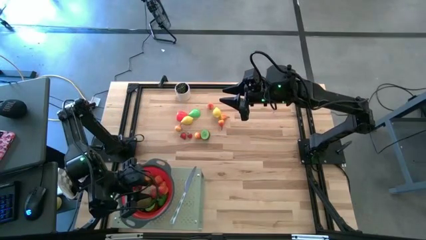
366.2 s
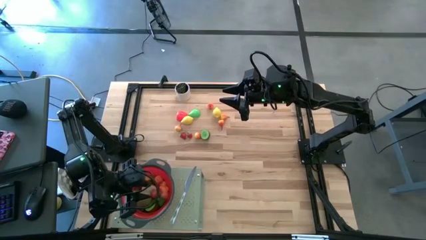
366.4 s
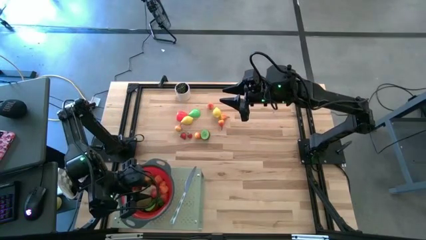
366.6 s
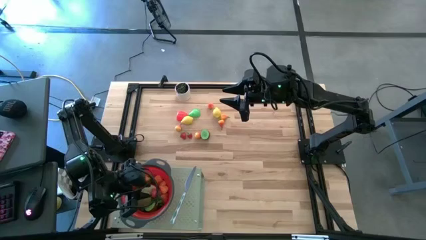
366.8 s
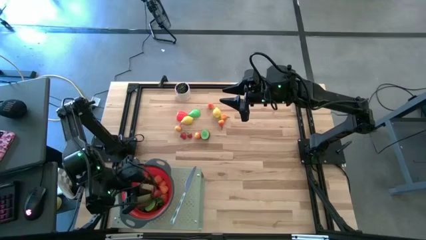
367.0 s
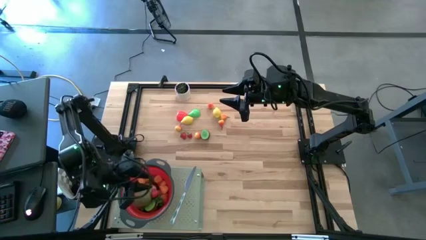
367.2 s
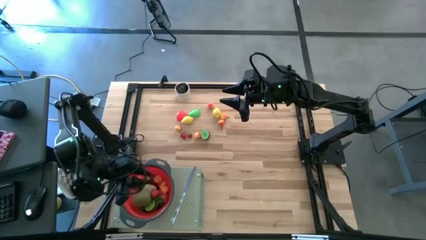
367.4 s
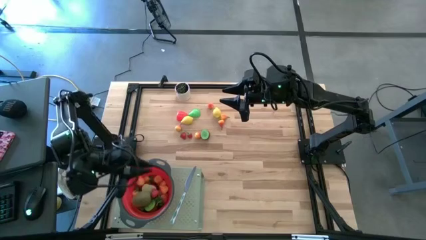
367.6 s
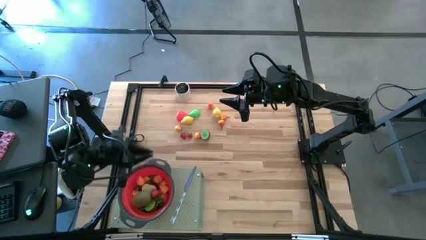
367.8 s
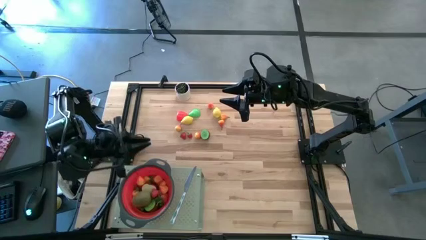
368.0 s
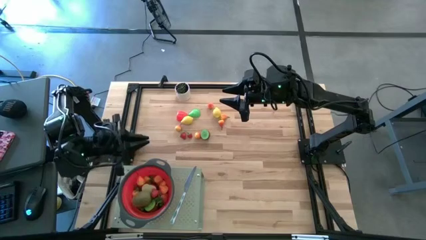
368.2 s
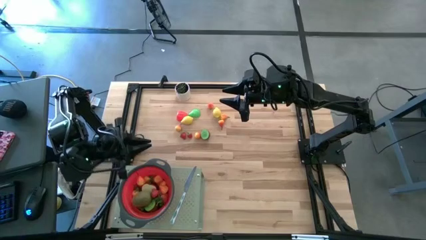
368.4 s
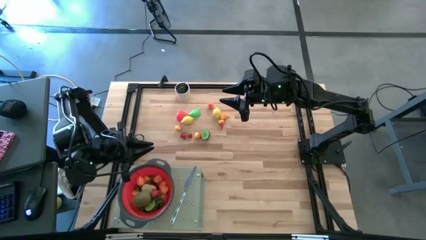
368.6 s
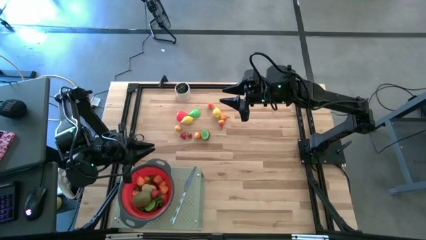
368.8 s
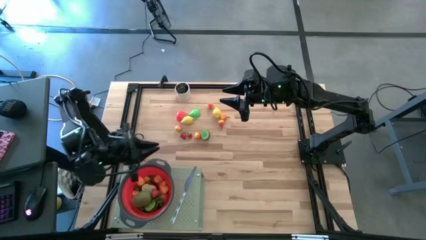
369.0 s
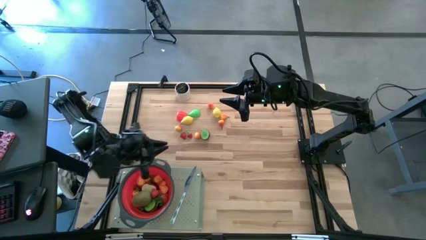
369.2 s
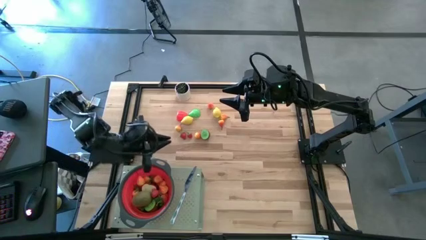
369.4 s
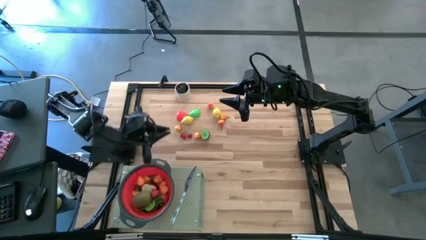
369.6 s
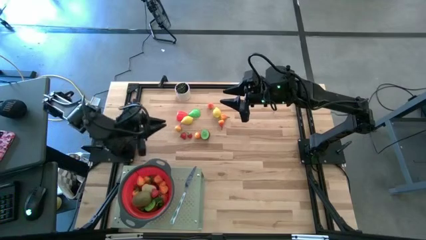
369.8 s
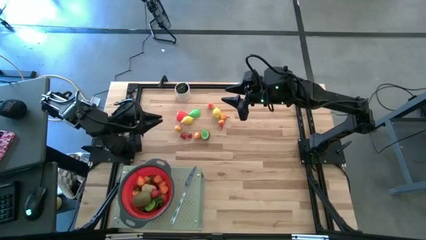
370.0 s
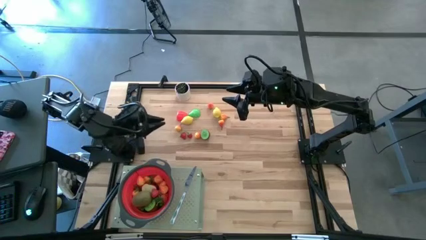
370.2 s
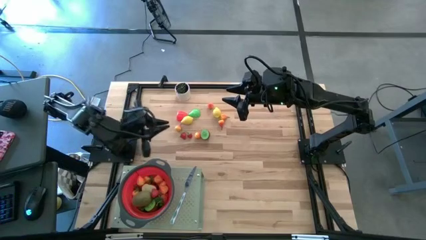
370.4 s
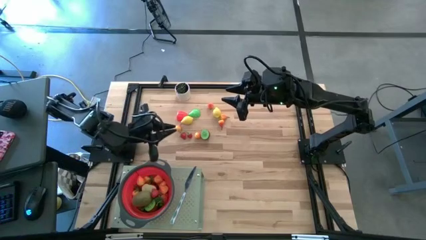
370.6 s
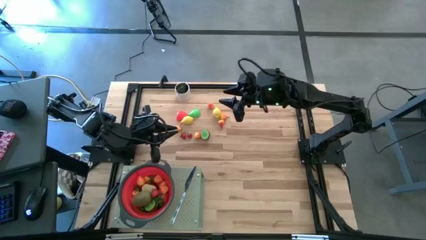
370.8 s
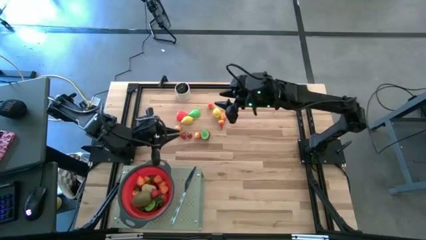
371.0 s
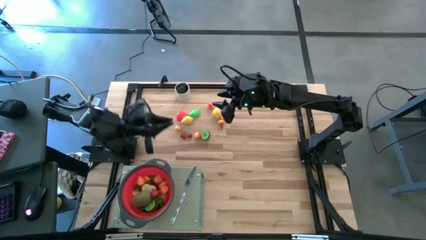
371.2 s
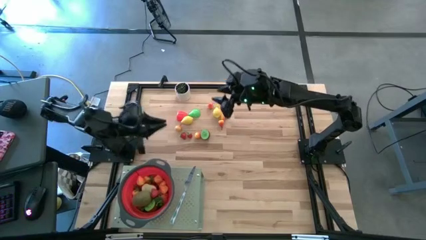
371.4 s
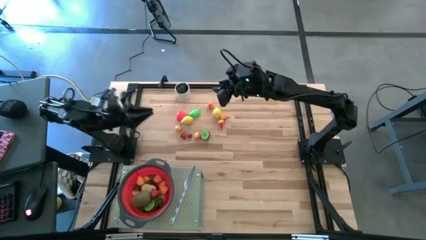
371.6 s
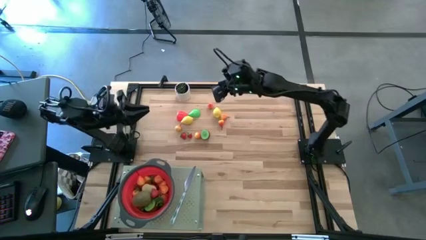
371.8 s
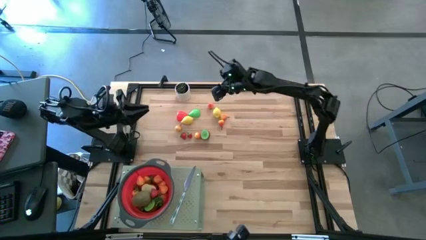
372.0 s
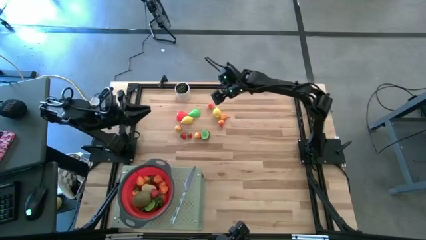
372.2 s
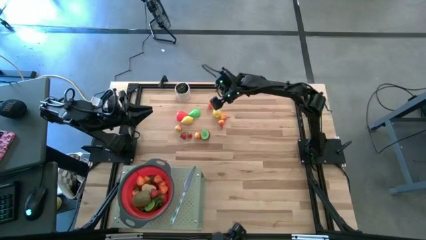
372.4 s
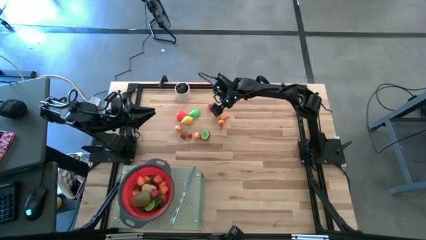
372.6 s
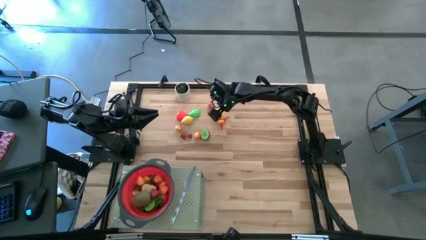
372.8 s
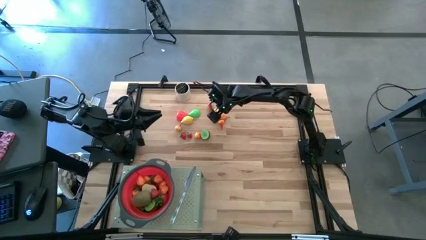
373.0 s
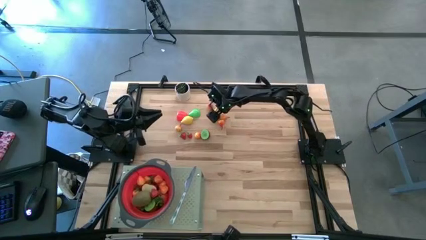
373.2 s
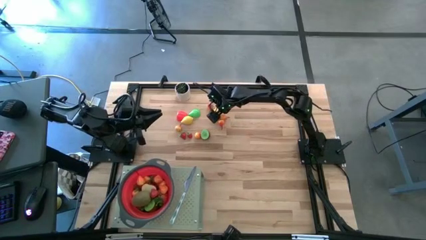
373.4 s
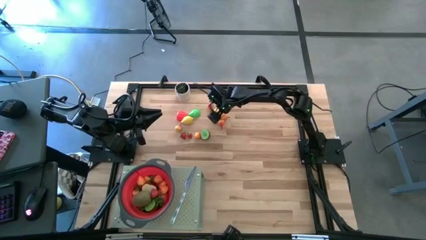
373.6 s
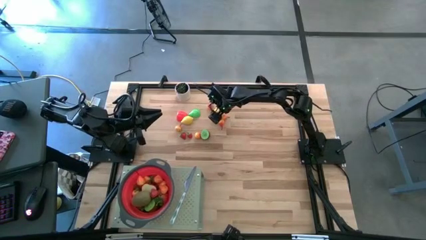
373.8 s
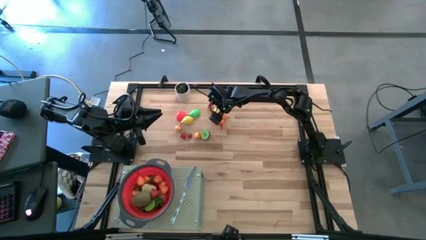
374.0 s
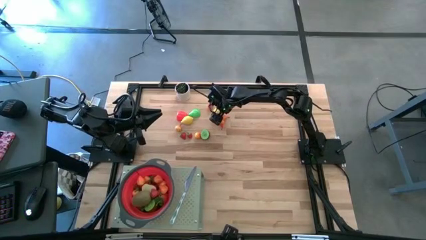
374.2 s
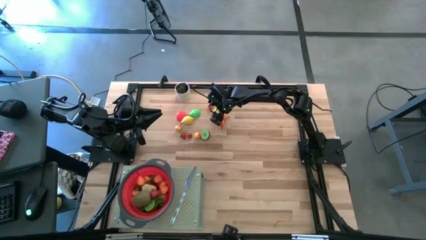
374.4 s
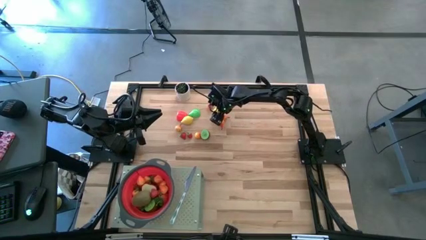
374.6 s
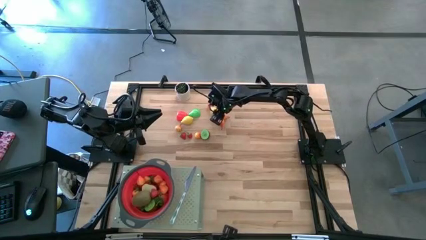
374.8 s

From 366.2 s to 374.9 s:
Task: Pick & Place Fruit
Put the lemon into the red strainer bowl on the shelf

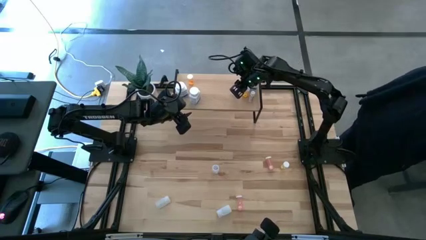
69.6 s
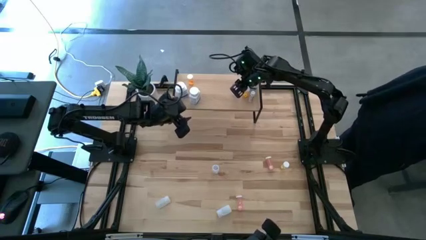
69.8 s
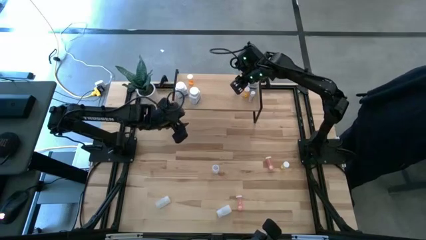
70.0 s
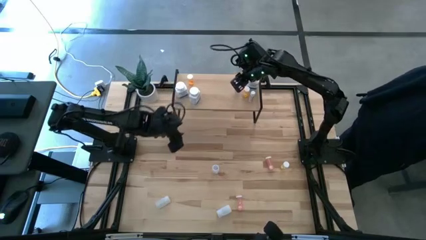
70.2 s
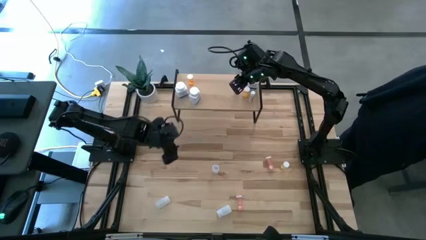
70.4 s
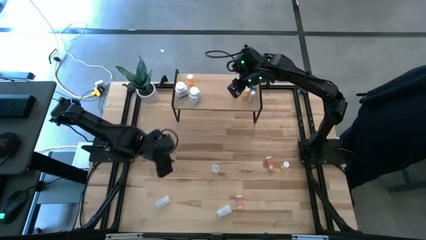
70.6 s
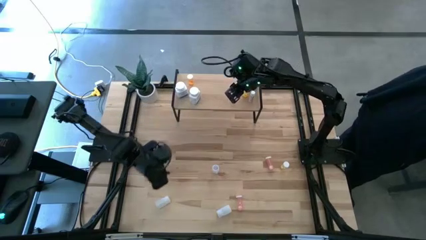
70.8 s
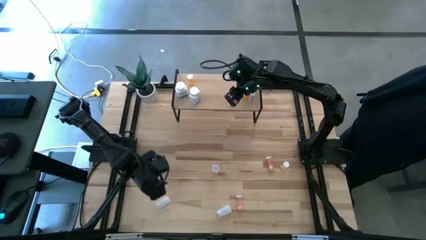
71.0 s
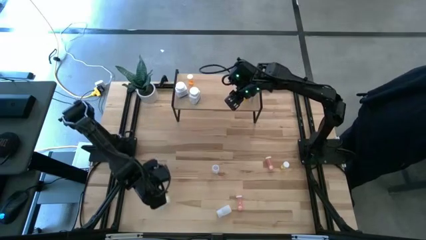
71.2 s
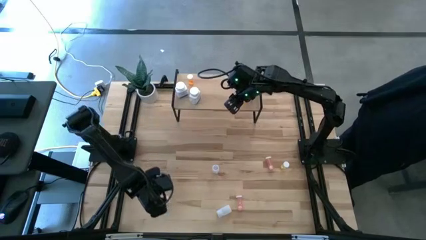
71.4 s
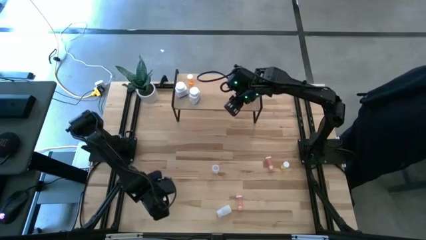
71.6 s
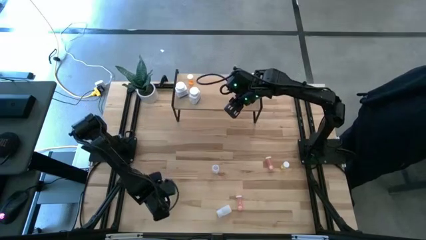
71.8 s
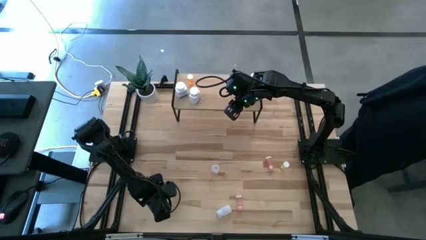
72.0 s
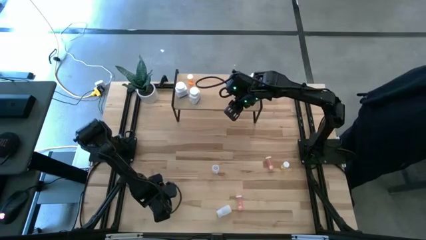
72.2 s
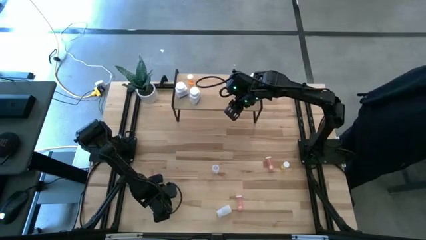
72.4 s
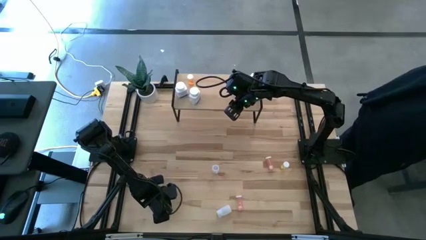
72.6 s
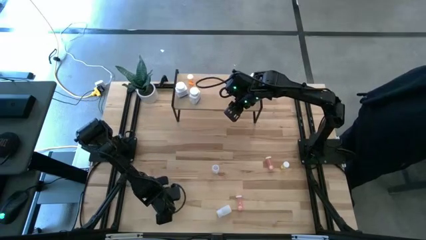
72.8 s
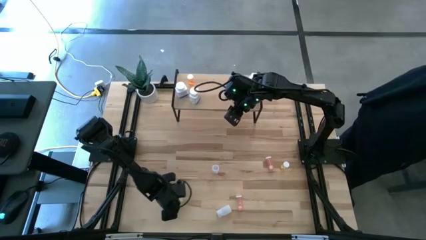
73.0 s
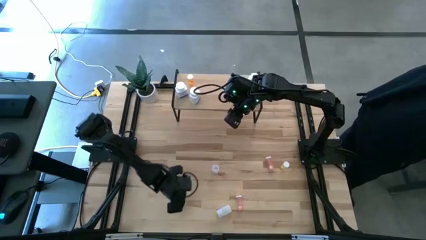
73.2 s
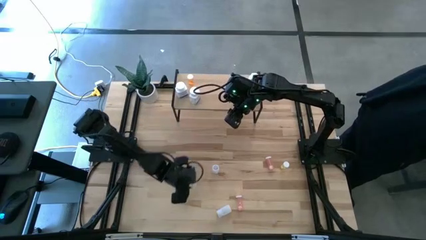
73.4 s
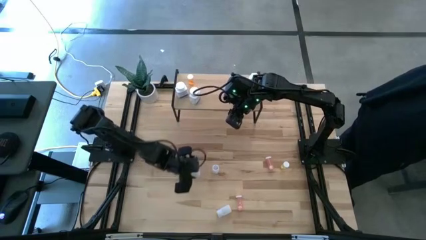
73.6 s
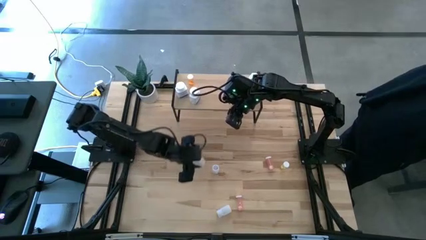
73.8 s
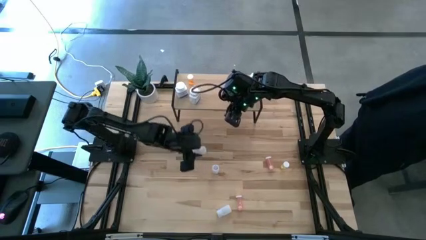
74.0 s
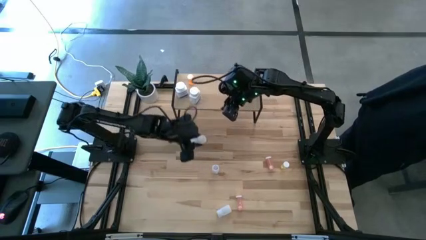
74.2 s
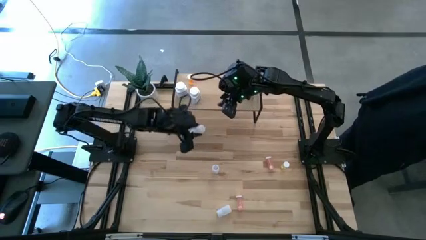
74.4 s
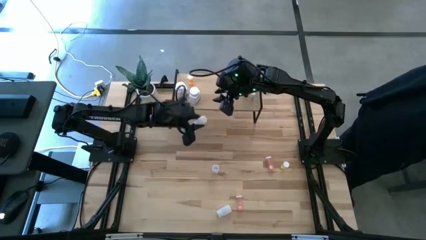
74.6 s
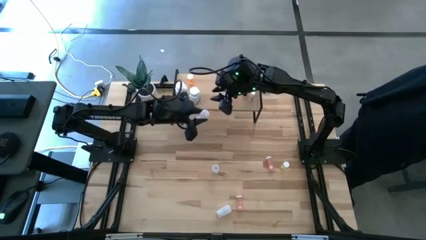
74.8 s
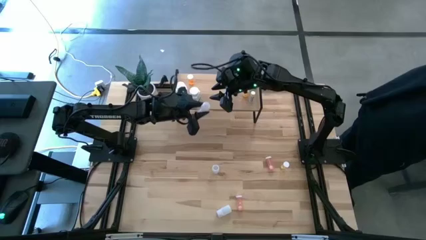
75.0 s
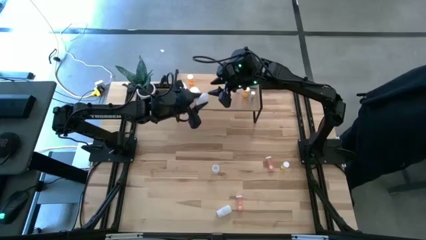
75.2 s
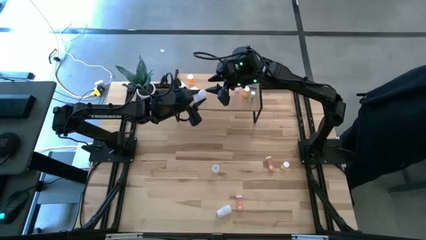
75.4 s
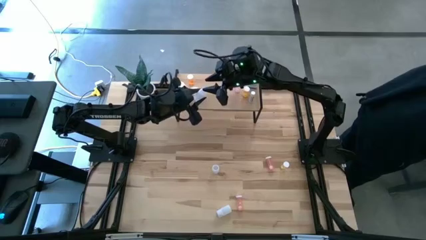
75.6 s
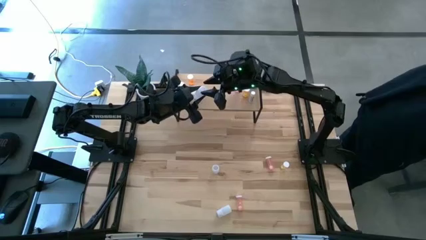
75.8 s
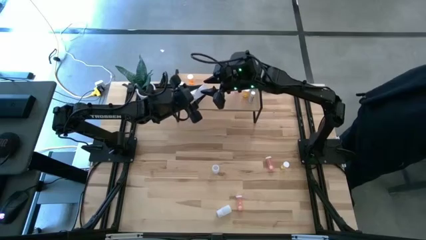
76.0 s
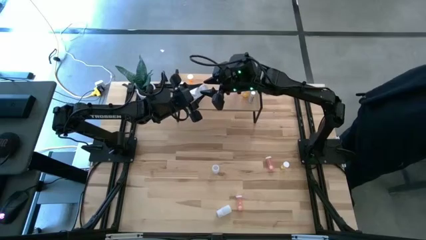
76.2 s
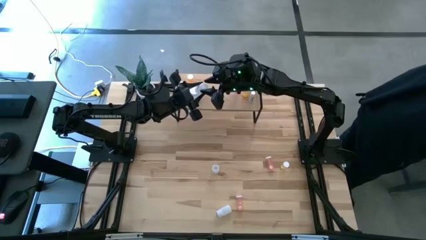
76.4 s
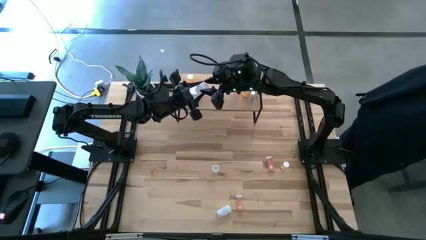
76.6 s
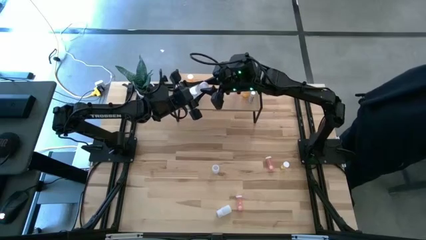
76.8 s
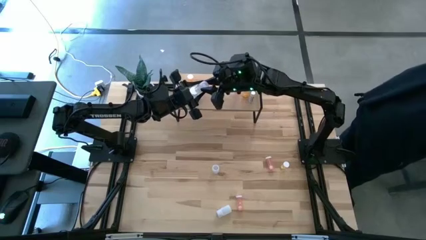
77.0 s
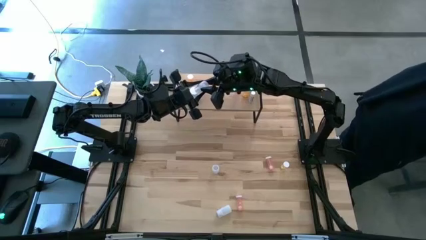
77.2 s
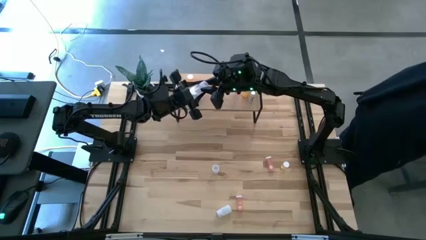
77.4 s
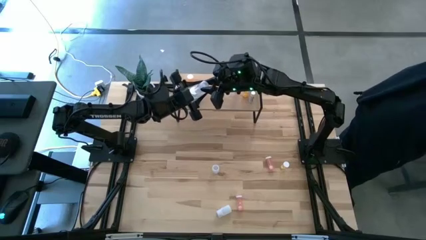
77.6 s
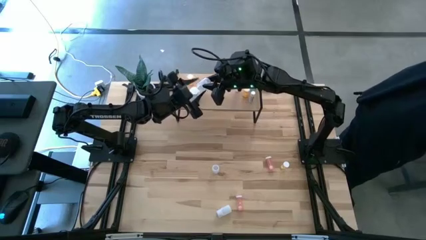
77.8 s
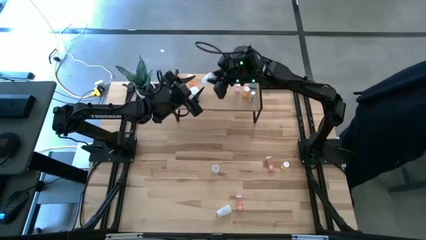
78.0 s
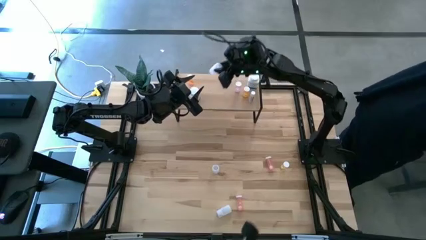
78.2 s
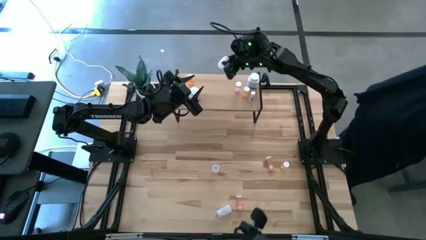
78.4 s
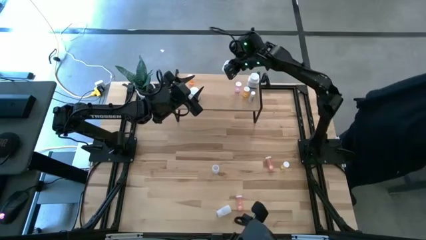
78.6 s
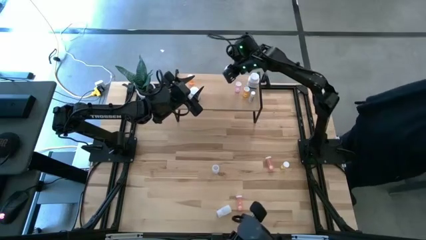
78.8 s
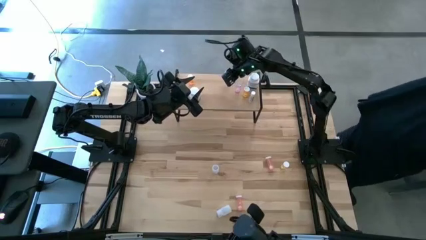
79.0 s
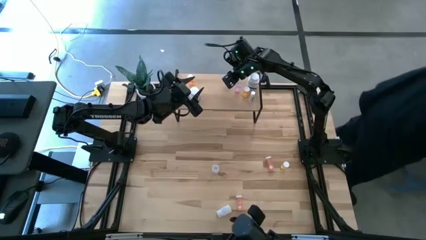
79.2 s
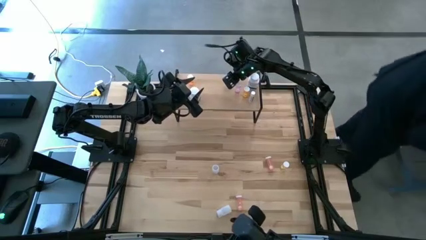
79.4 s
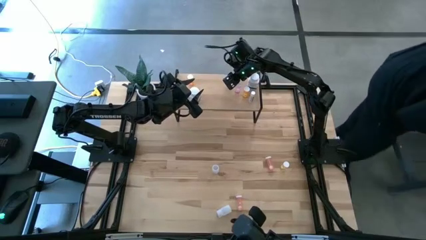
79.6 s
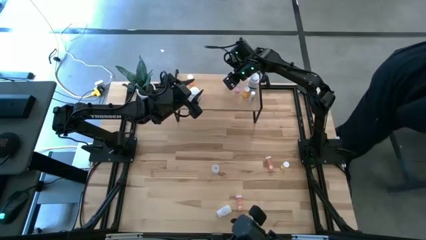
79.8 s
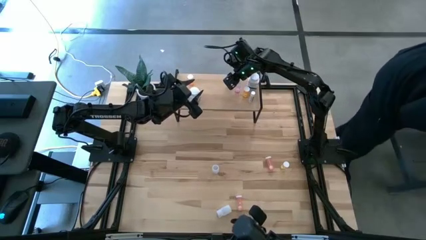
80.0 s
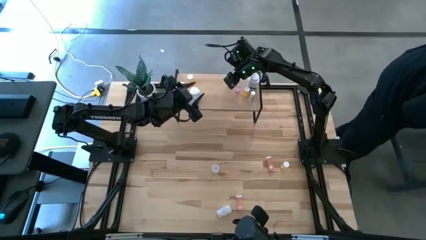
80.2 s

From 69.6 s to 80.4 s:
Task: Pick and place medicine bottles onto shelf by color
Put the bottom left white pill bottle on the shelf
